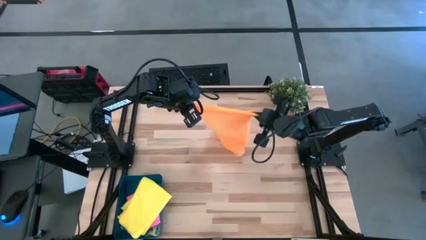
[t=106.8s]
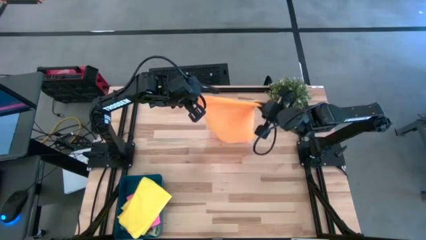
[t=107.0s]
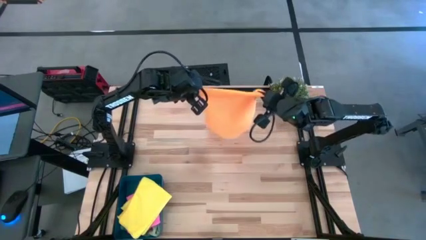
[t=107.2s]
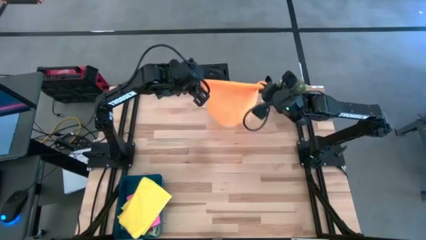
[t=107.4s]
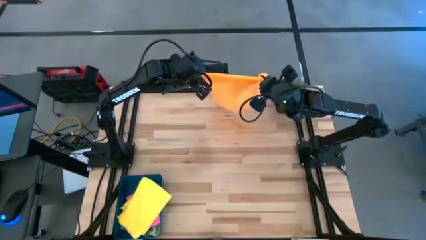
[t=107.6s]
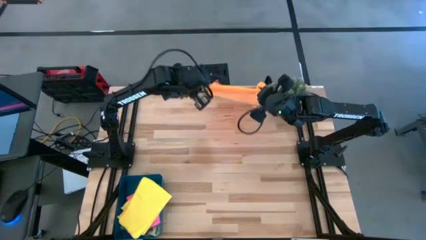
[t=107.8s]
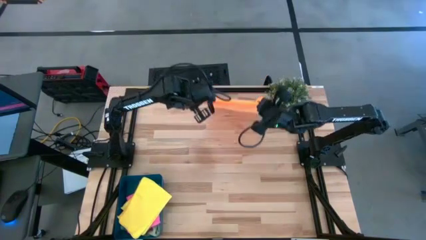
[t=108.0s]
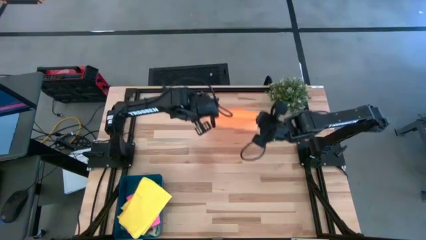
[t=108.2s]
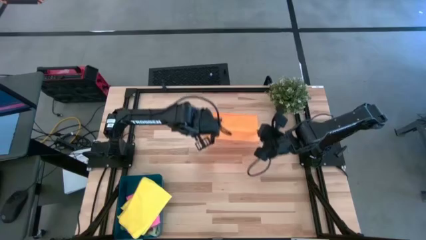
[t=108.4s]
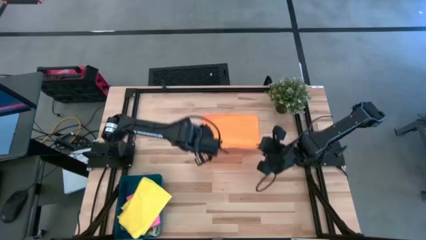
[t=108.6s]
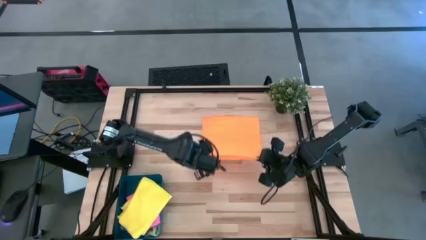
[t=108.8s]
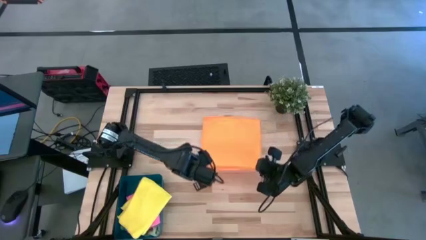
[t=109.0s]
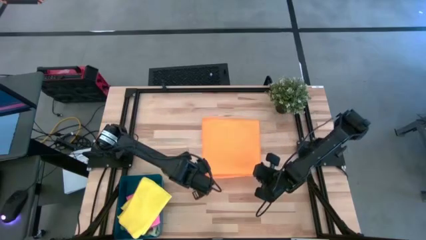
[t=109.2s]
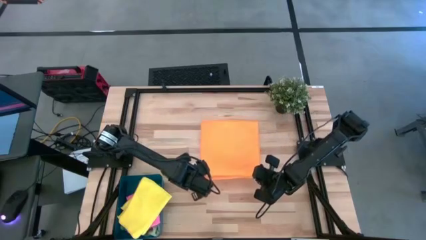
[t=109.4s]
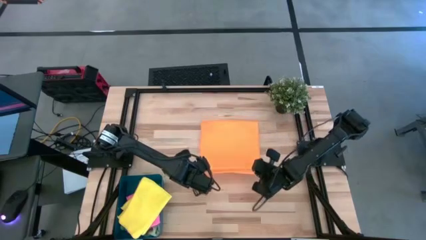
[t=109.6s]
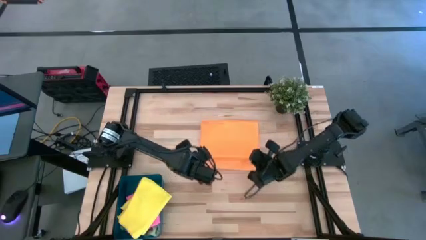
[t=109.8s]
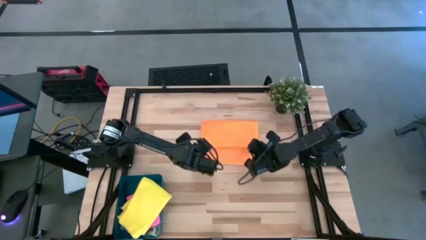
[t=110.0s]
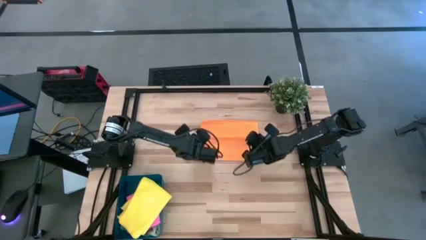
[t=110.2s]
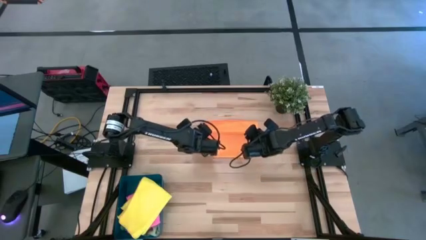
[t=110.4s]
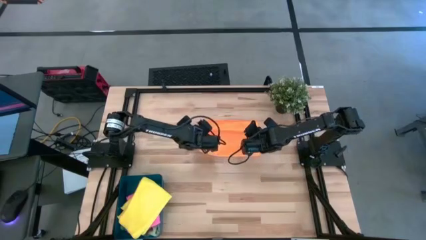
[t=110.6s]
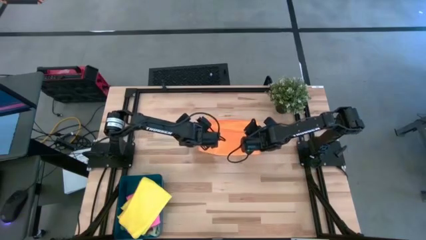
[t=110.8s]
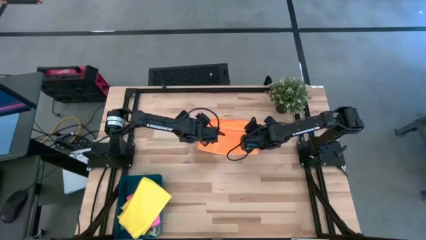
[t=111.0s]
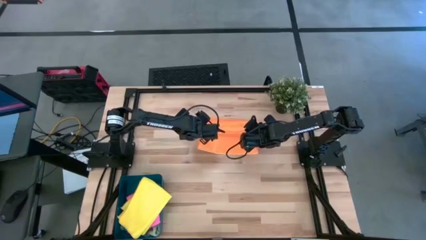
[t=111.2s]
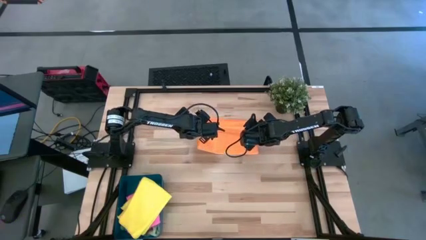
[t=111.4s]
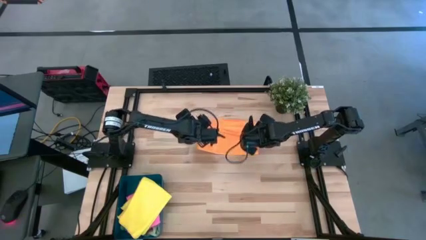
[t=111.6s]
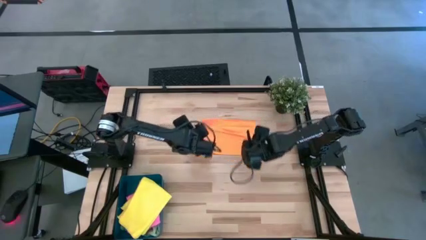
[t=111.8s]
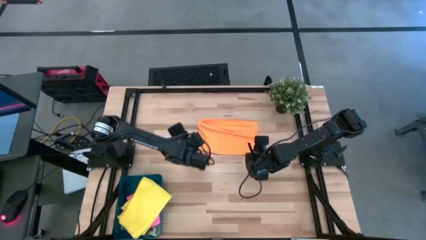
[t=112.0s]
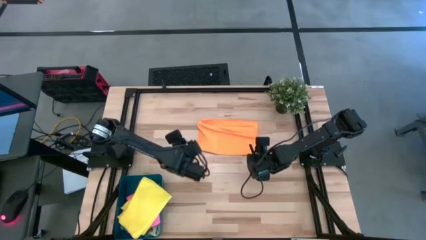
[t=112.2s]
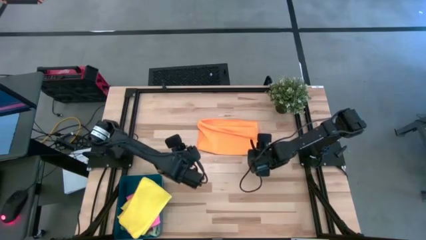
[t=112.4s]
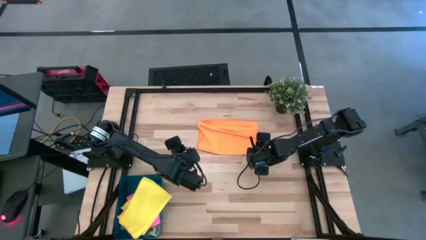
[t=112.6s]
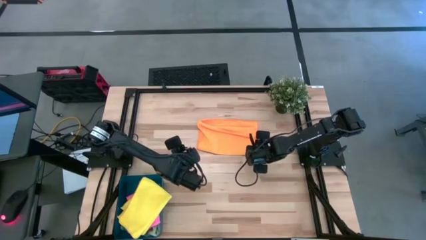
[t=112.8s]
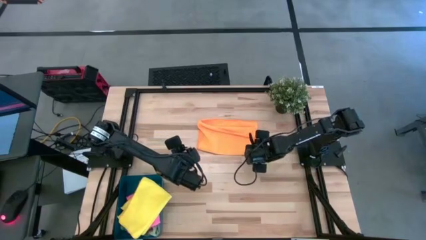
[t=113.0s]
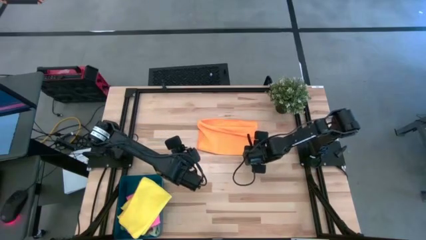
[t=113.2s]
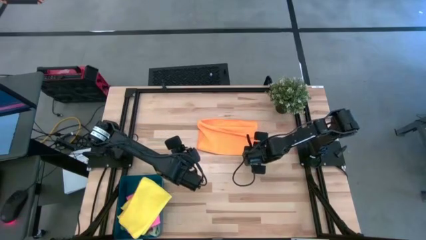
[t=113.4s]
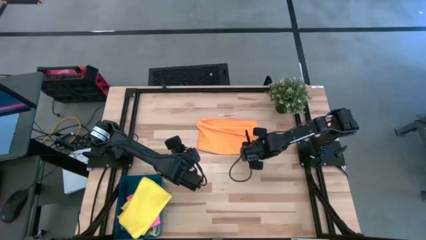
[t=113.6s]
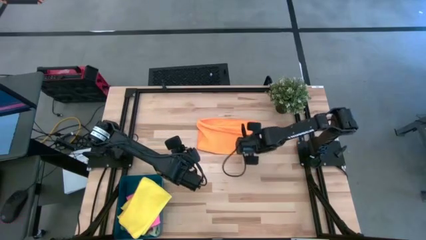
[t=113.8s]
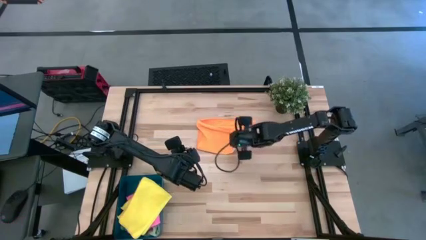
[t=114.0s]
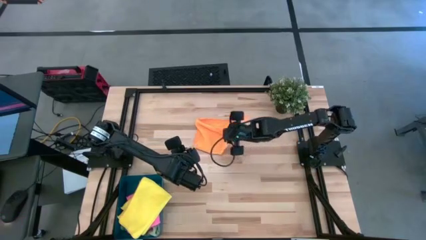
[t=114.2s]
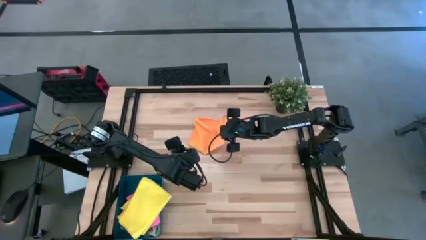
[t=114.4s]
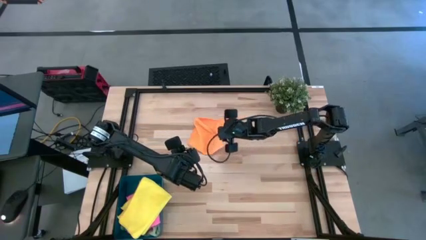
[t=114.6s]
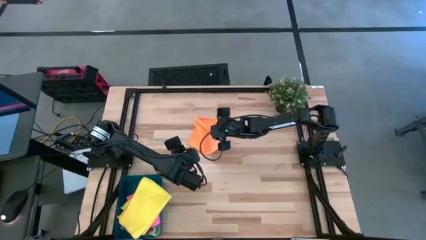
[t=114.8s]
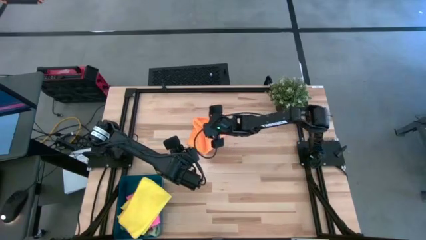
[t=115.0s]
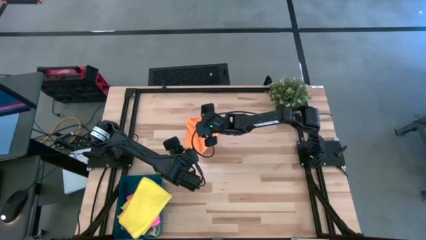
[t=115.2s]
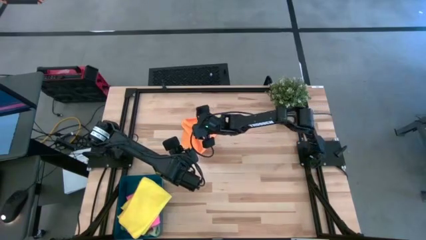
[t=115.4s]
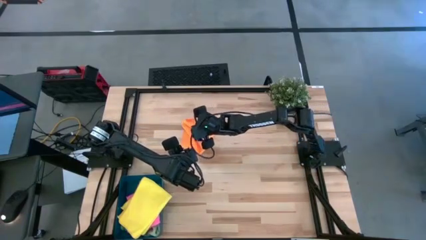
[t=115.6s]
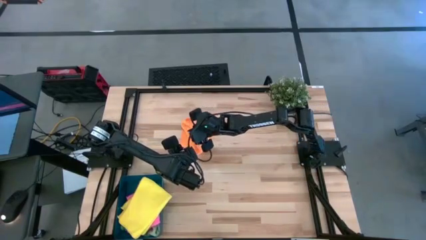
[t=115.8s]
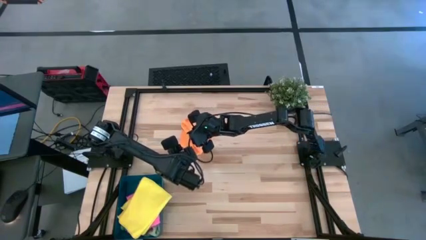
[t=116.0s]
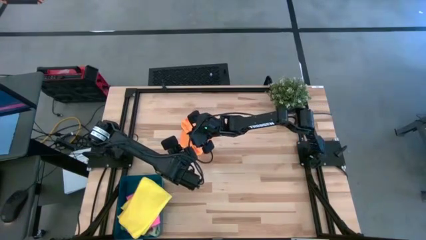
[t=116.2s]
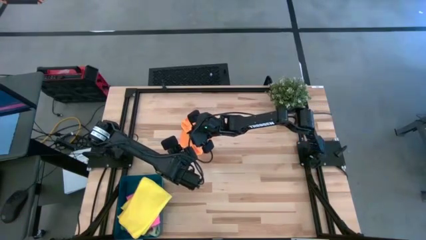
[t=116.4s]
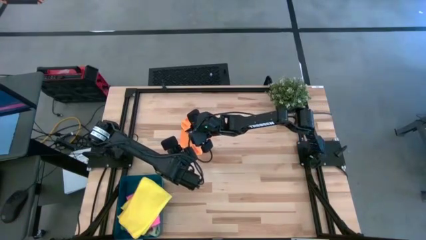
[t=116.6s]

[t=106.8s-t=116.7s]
Task: Fold microfiber towels
Fold the orange microfiber towel

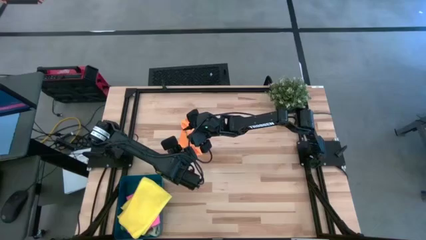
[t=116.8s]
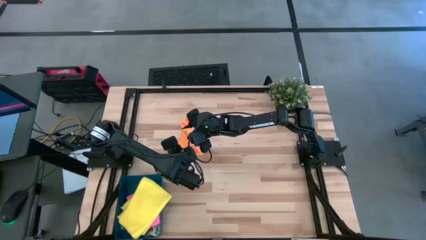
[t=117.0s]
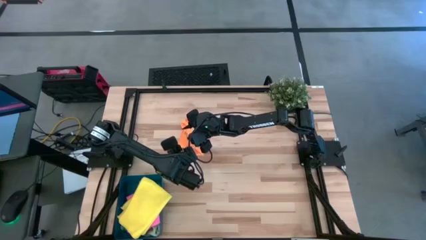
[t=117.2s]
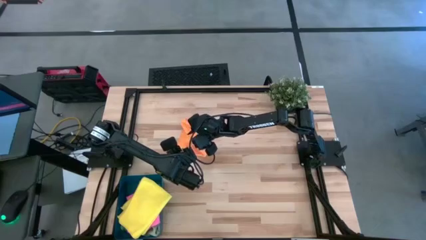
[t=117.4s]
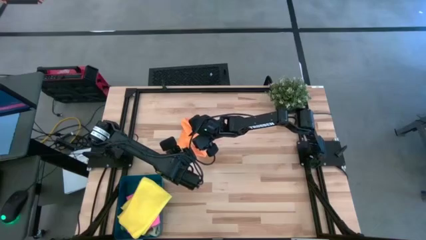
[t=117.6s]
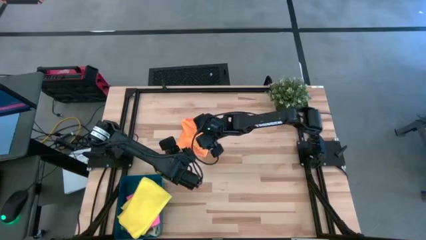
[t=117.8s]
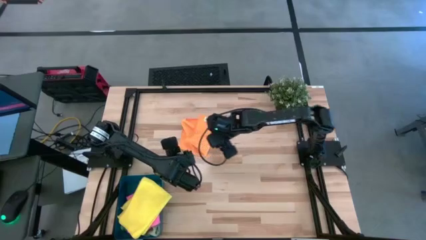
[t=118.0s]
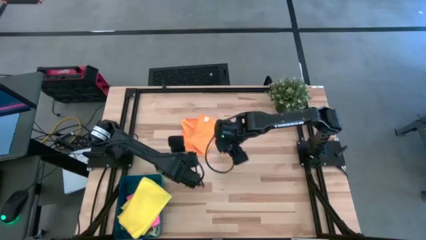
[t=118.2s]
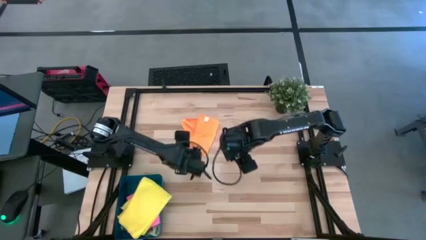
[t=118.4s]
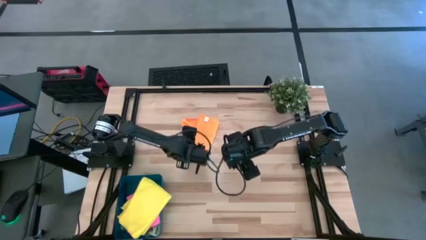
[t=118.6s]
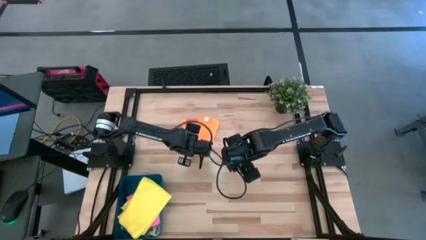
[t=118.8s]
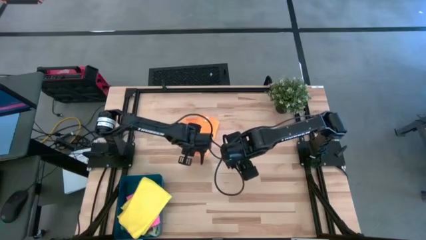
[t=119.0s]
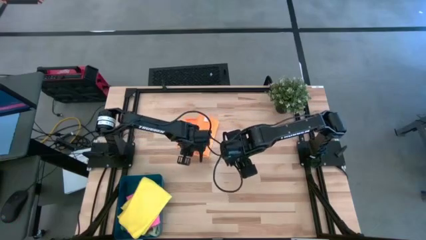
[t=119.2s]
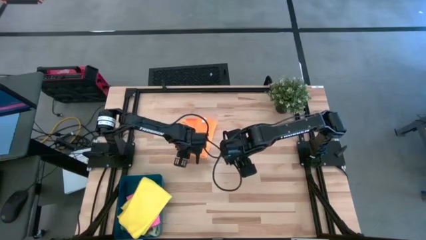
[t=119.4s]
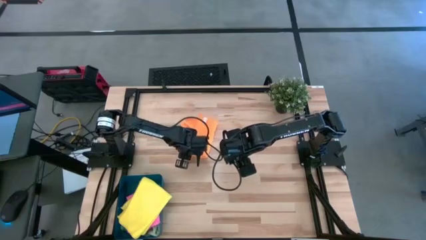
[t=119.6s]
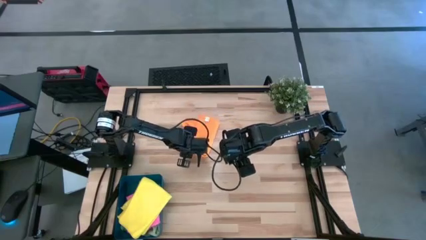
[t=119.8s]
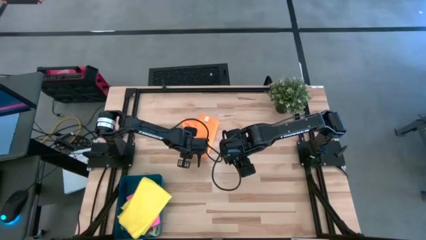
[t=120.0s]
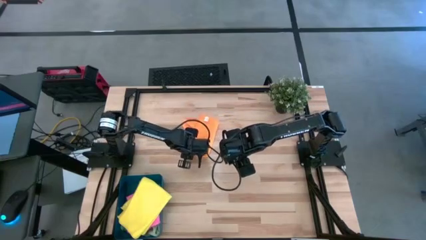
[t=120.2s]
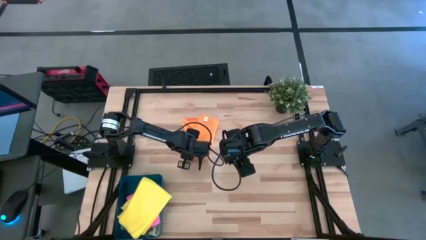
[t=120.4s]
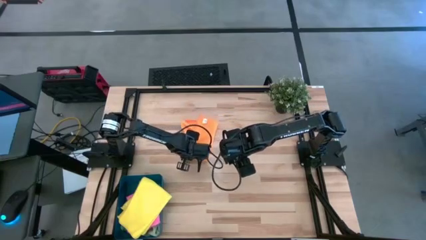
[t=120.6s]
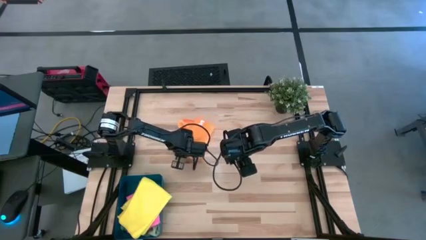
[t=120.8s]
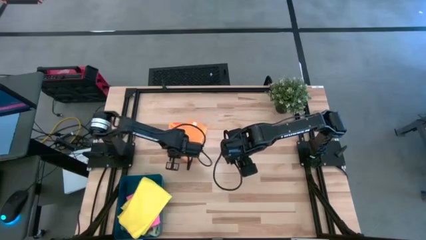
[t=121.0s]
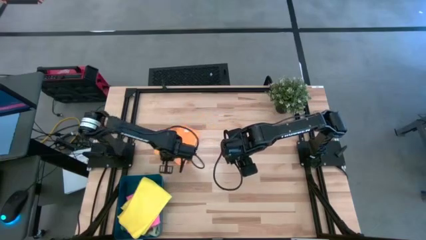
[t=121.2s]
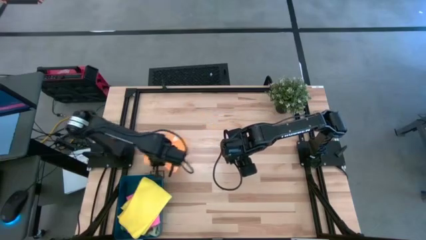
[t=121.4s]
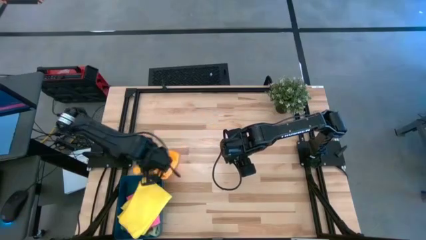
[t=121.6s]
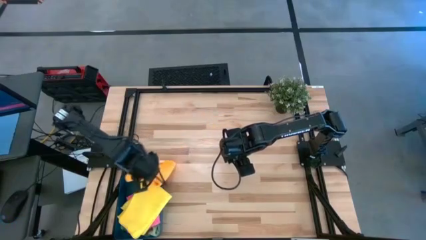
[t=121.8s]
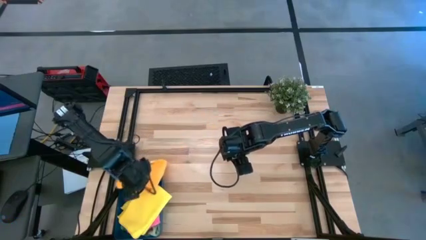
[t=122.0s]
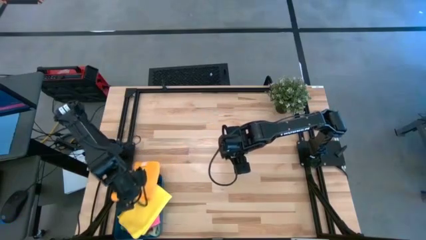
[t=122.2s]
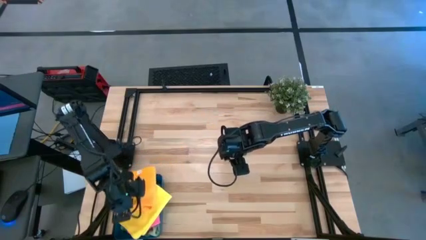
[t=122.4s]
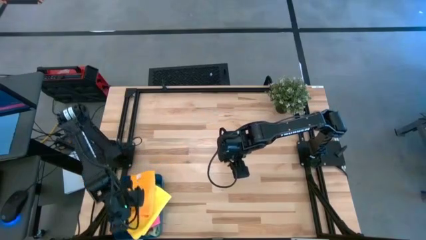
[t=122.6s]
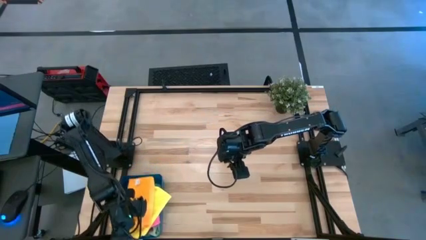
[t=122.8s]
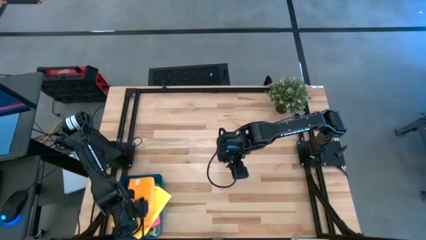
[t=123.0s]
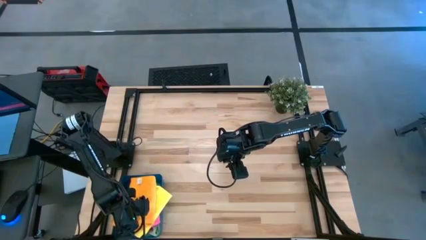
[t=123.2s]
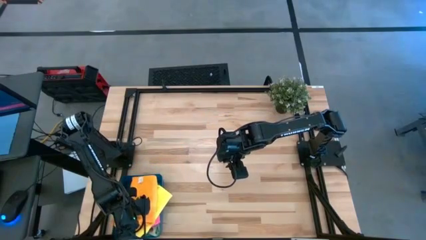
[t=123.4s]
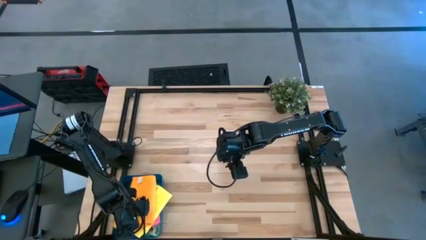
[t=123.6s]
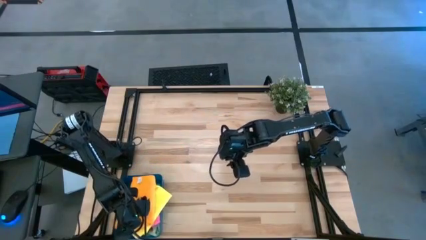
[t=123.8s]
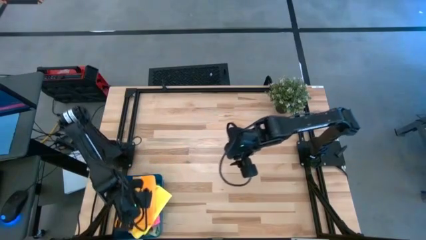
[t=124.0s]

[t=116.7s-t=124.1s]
Put the orange microfiber towel into the bin
